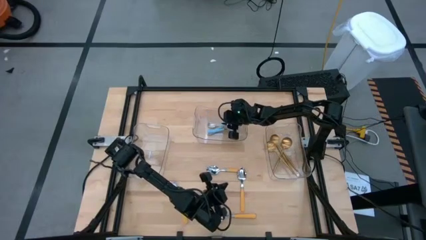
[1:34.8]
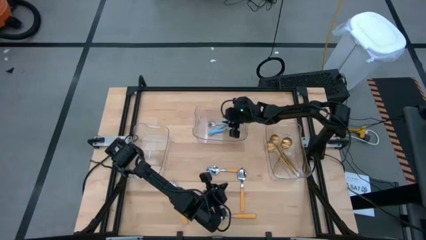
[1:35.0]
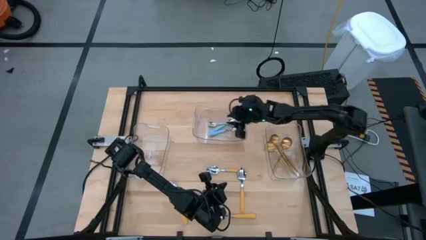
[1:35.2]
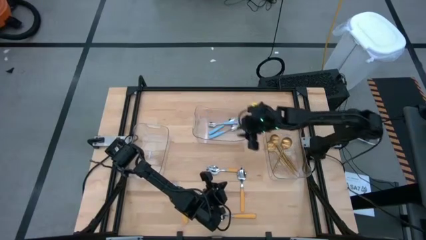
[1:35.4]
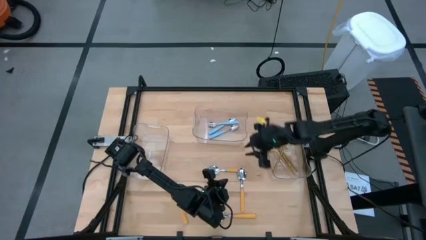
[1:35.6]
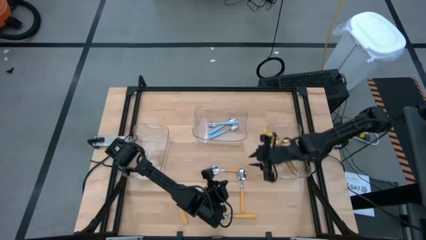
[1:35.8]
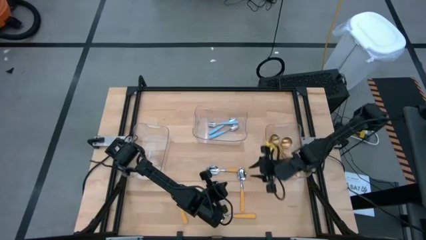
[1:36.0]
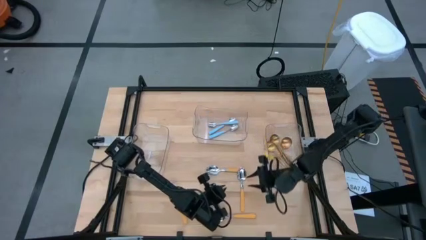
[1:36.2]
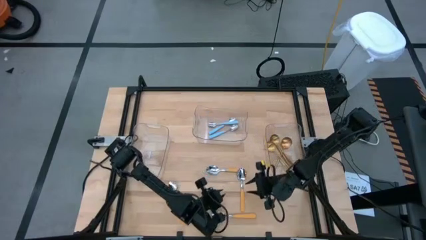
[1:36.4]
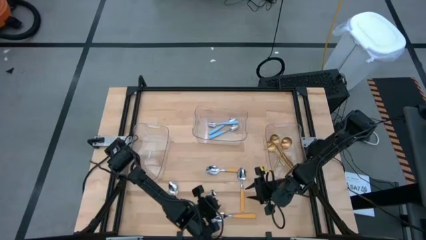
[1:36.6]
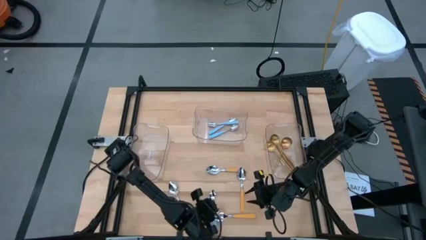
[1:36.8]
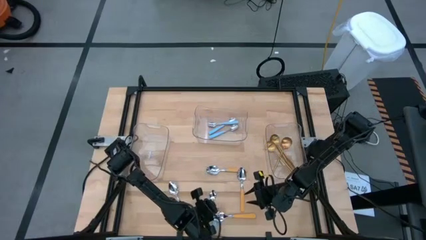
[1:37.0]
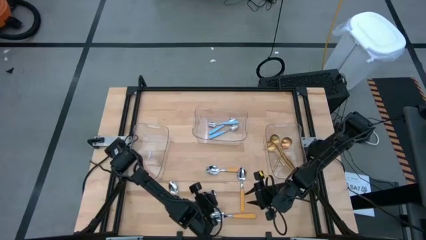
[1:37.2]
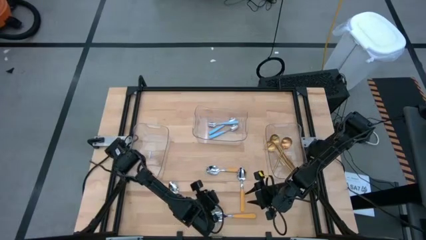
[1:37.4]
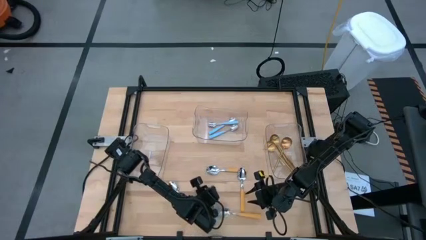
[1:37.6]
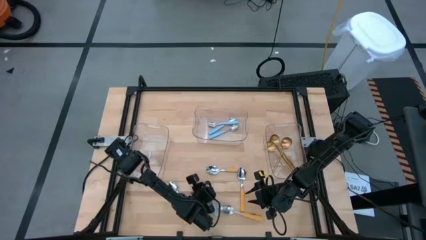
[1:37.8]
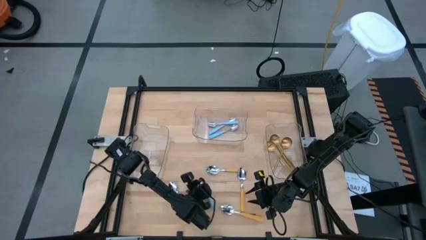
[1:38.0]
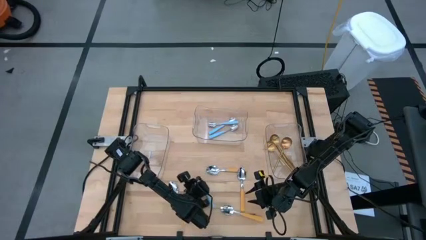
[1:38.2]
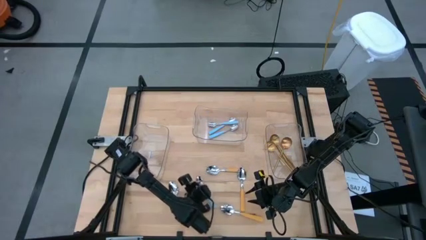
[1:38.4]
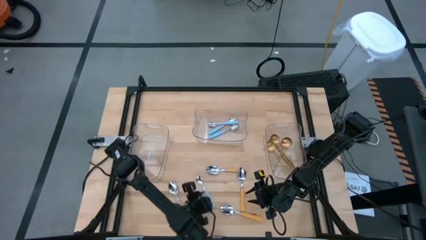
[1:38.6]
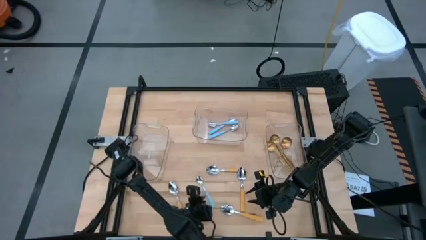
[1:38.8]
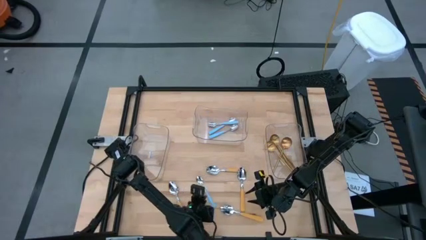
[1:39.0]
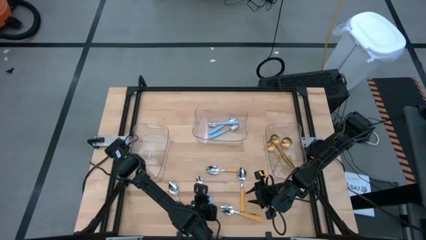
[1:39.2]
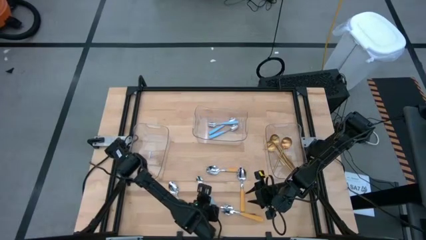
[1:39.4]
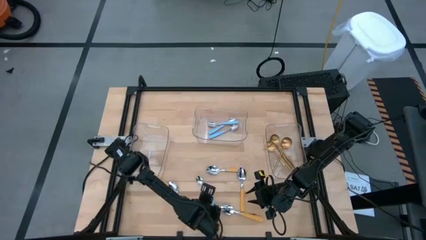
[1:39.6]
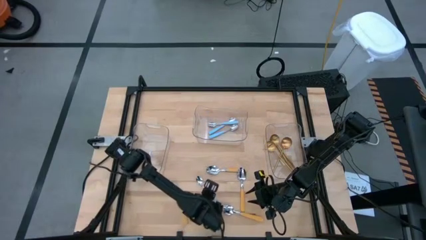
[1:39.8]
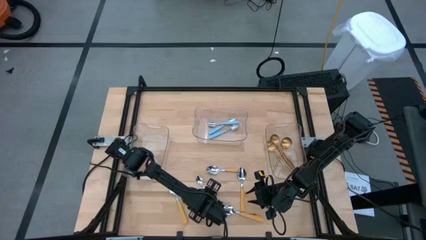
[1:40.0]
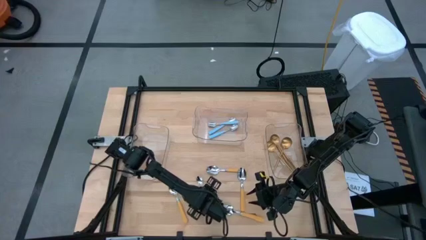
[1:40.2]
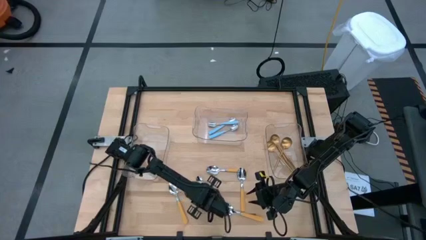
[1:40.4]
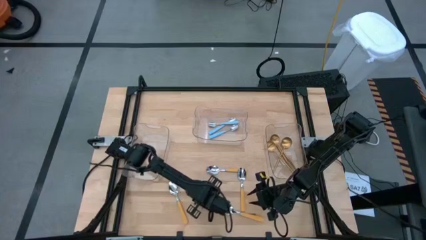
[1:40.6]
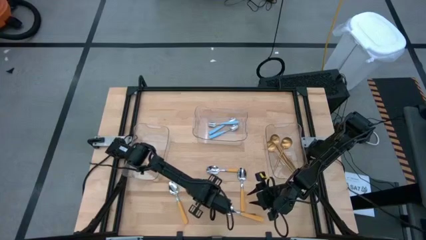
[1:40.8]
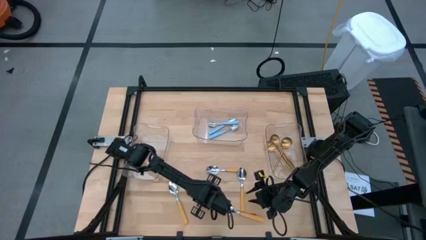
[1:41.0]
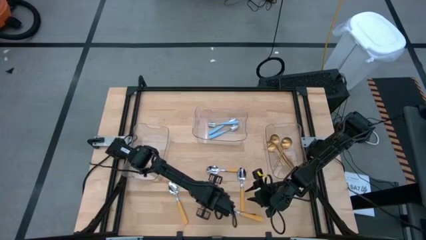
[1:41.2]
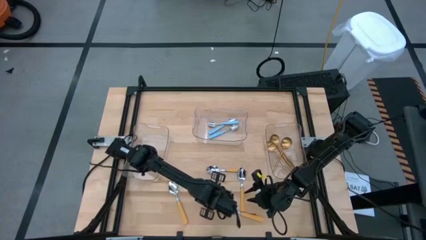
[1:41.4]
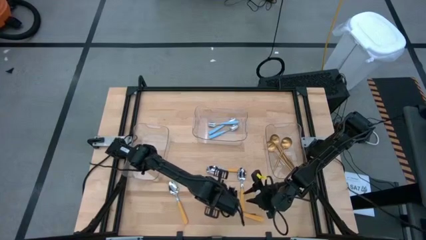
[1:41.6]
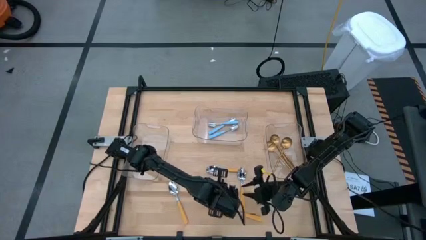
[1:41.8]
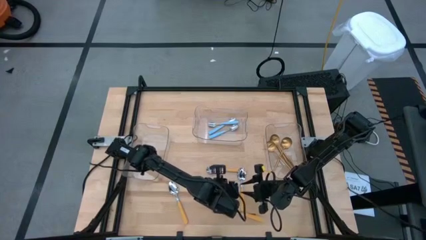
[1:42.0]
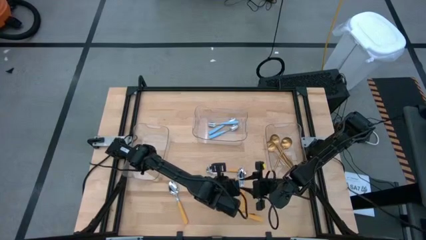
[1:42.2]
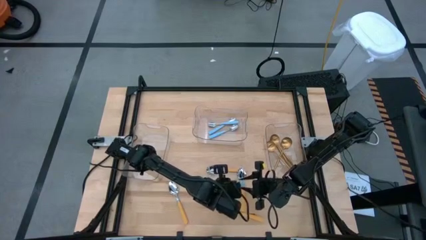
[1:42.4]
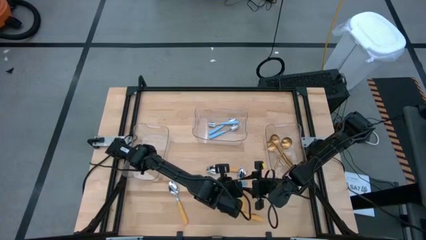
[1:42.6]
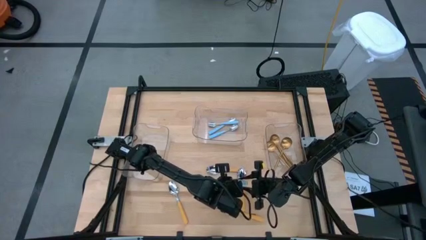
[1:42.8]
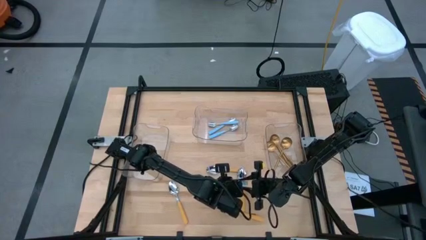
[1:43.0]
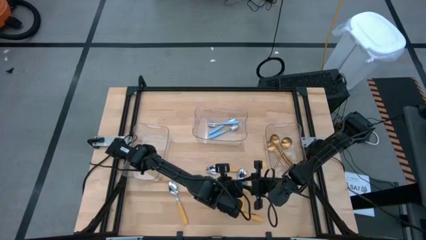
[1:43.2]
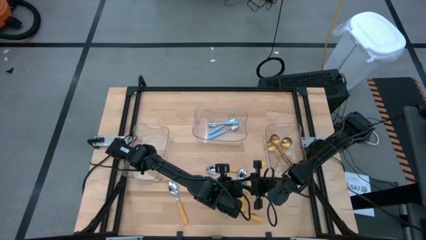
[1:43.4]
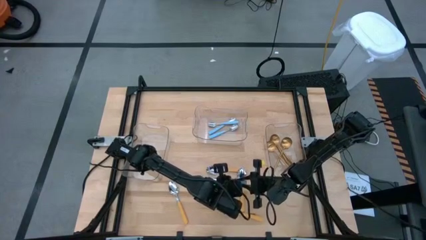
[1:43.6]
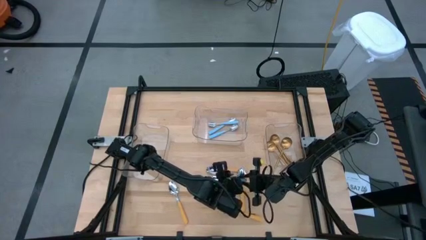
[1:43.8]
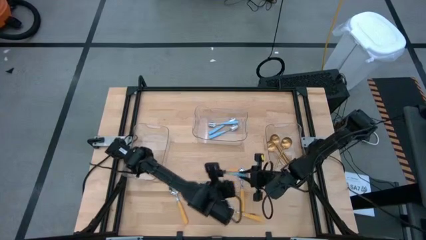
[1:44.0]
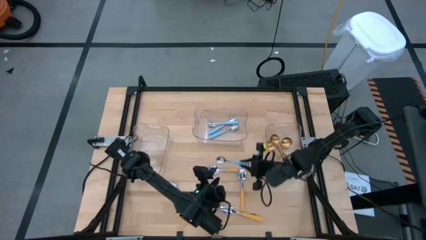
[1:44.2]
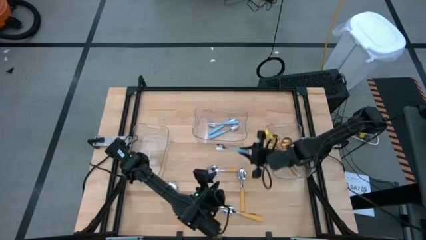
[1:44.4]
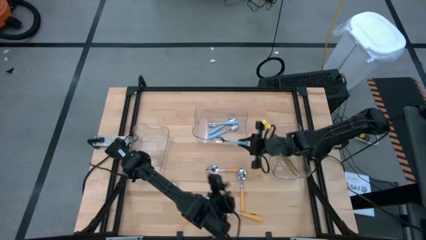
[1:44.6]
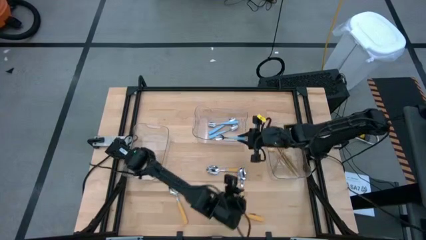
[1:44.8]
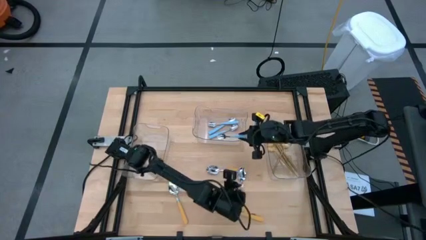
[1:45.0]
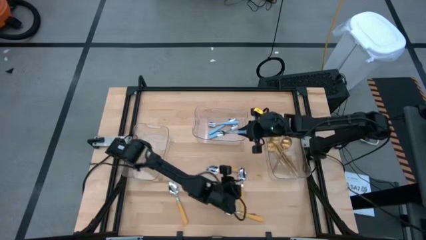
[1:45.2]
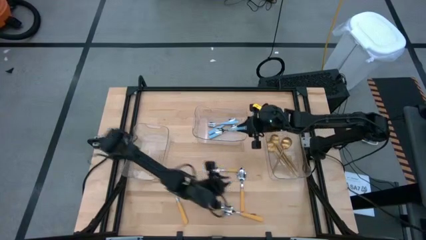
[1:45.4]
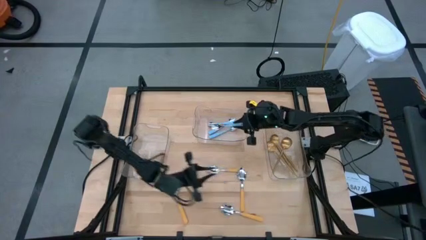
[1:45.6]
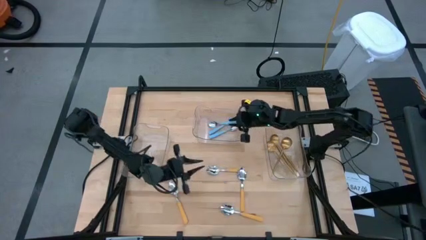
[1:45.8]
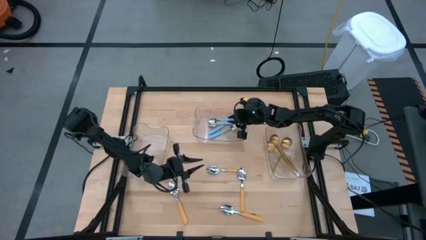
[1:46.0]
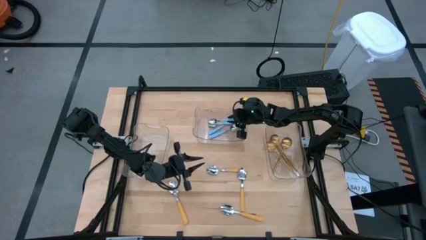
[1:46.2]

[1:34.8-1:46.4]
Task: Sort silverware by color (type)
Put the blue spoon into the top transparent bin

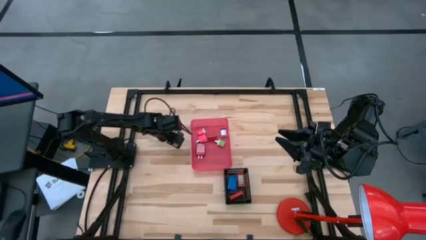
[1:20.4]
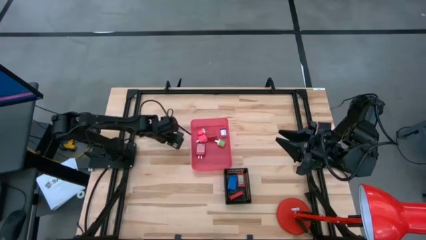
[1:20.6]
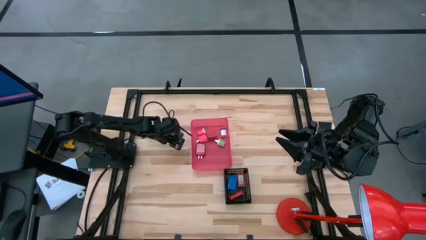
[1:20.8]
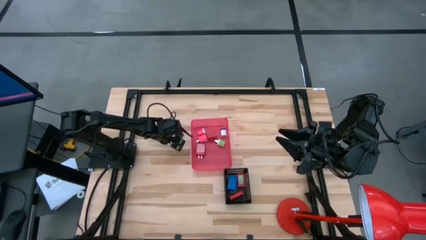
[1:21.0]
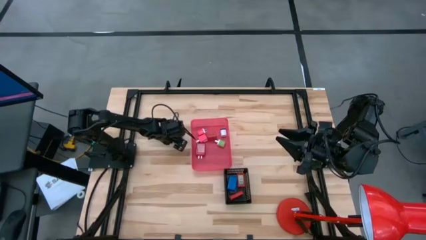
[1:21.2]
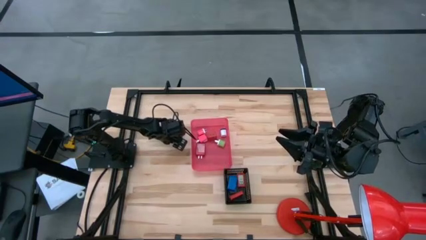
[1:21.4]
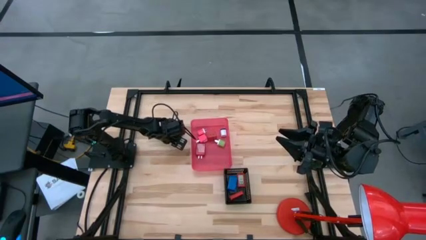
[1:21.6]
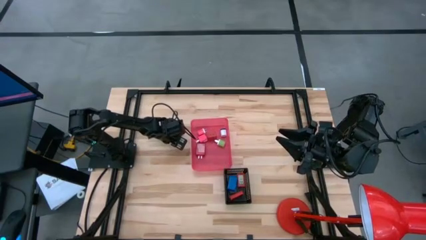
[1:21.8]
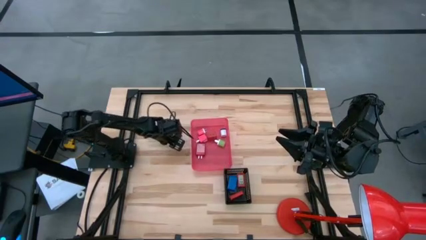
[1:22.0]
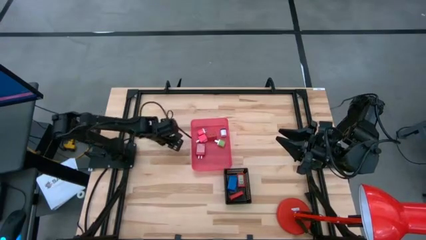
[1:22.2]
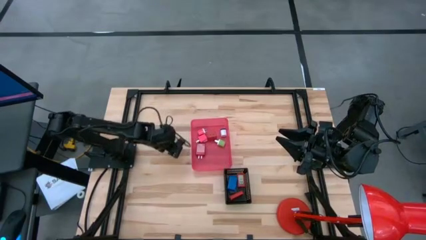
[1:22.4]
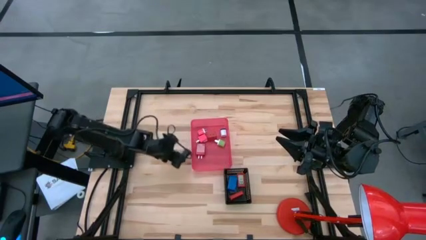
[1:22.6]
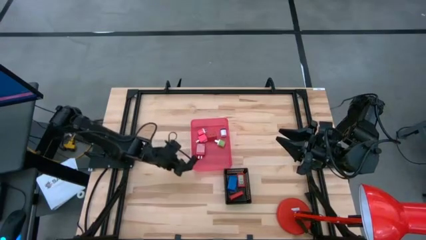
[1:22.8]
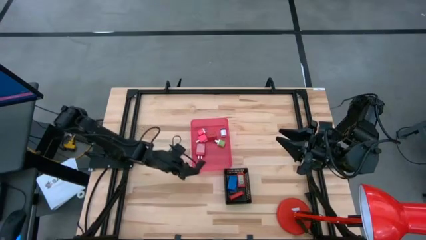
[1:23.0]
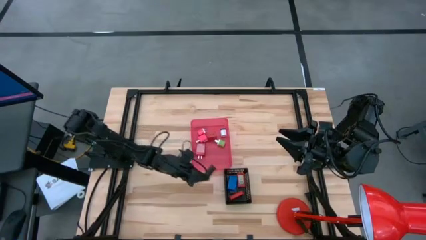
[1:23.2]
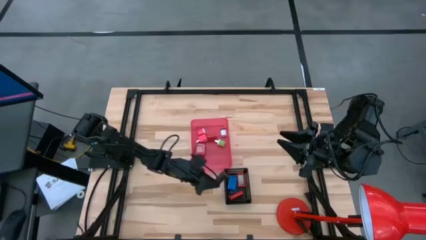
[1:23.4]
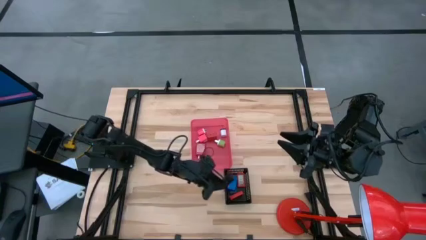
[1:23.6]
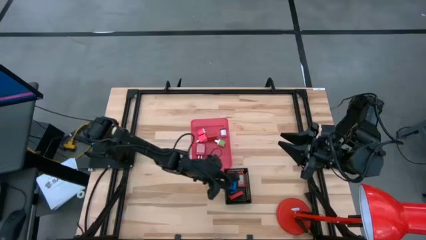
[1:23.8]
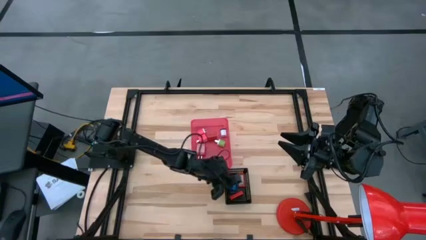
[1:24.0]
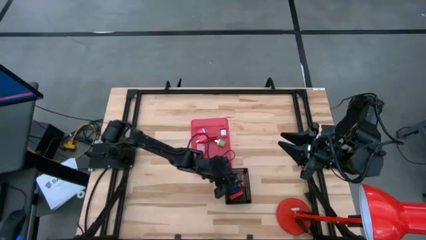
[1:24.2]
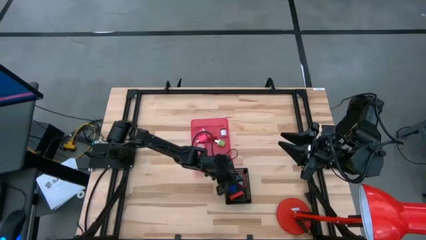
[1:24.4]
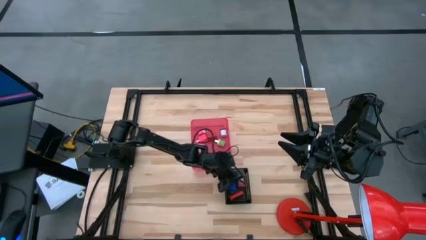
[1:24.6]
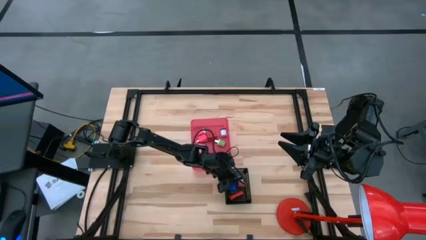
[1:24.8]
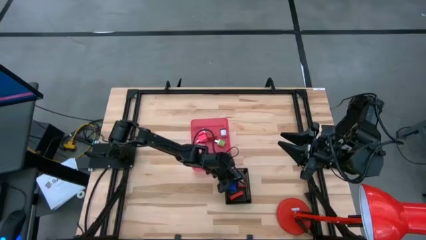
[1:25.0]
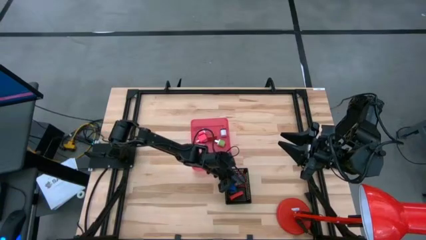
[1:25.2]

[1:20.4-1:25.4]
Task: Pick & Place Office items
Put the black digital timer into the black bin
